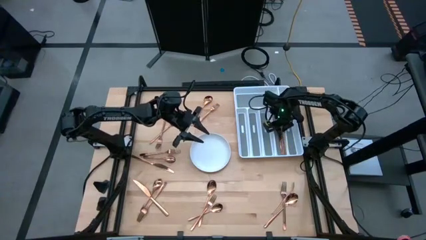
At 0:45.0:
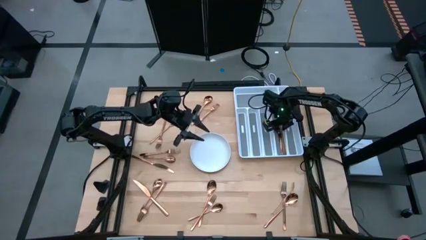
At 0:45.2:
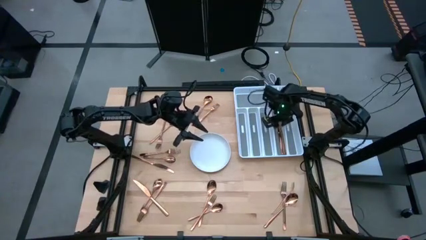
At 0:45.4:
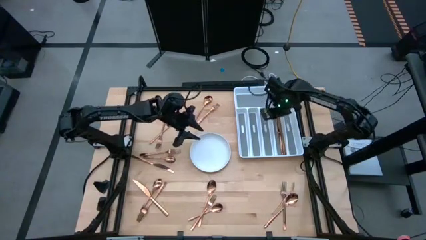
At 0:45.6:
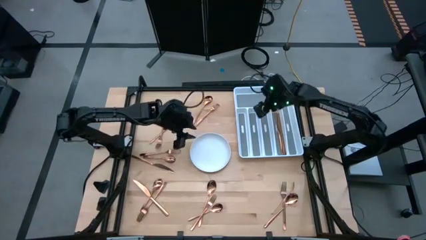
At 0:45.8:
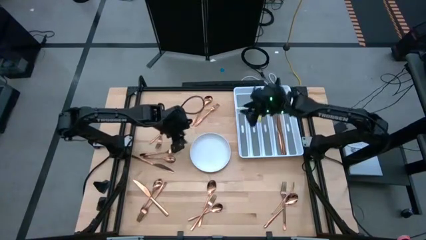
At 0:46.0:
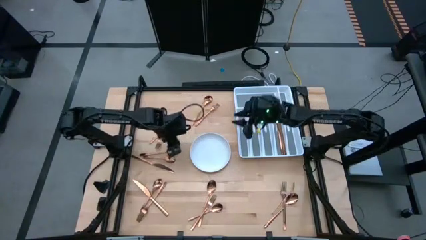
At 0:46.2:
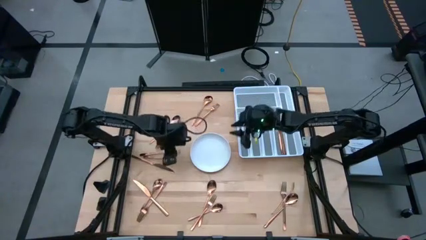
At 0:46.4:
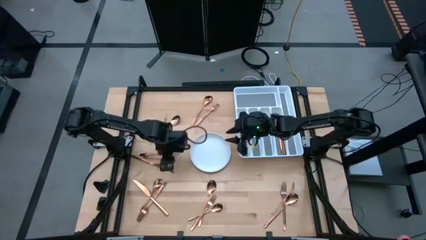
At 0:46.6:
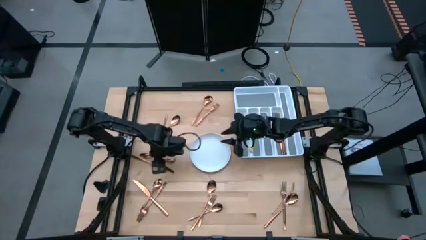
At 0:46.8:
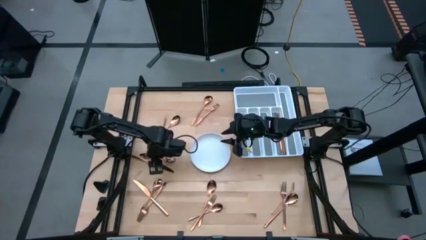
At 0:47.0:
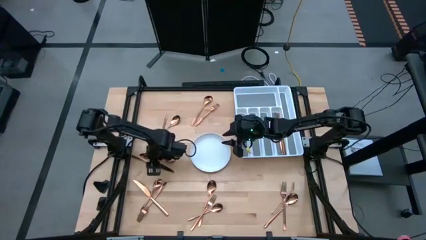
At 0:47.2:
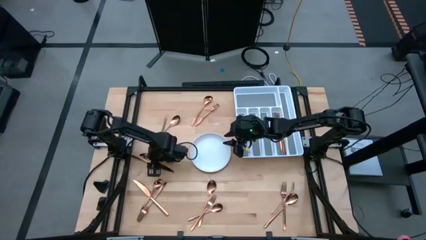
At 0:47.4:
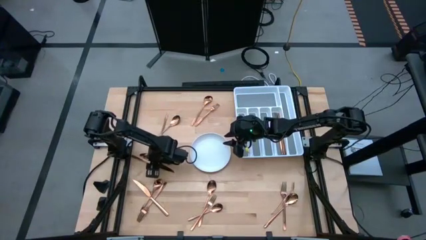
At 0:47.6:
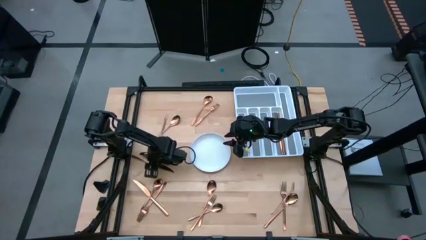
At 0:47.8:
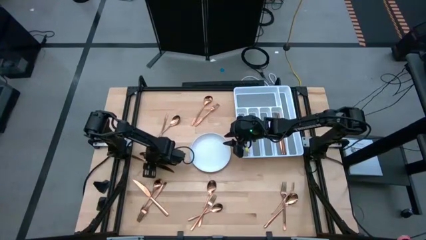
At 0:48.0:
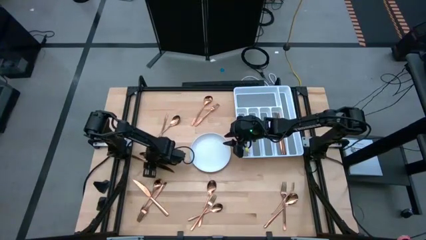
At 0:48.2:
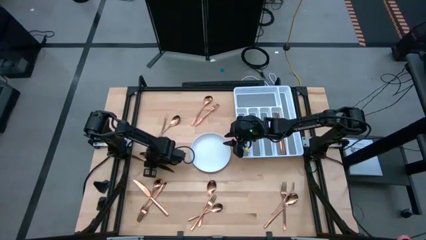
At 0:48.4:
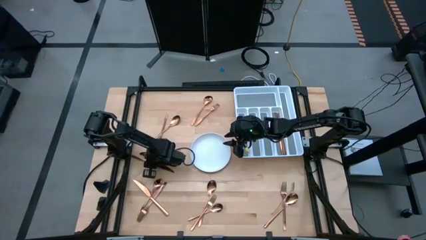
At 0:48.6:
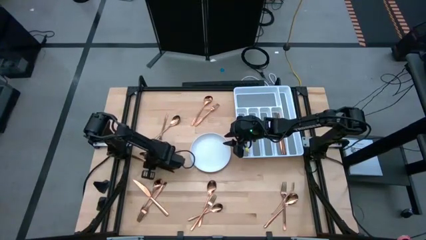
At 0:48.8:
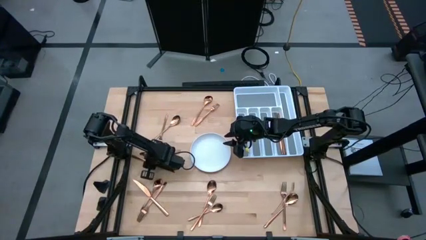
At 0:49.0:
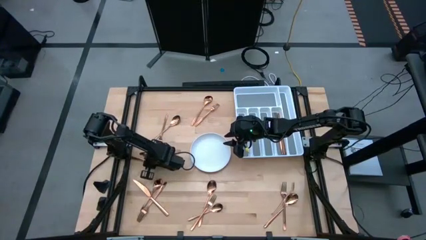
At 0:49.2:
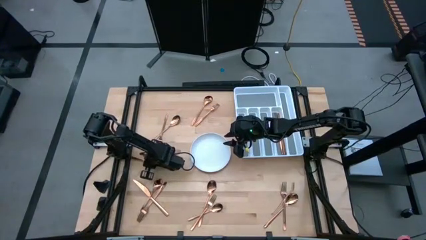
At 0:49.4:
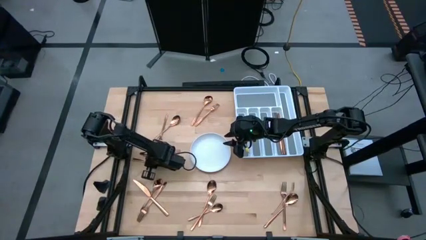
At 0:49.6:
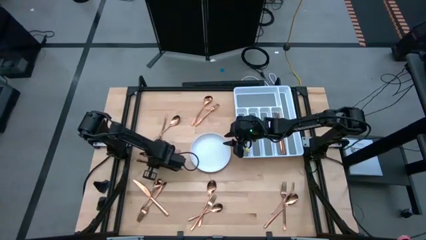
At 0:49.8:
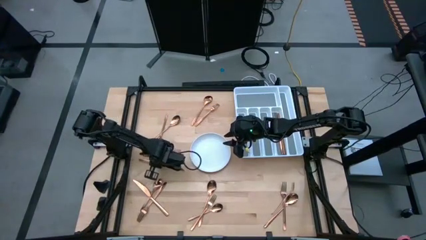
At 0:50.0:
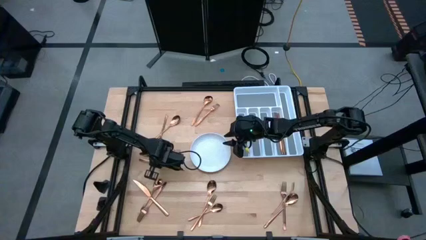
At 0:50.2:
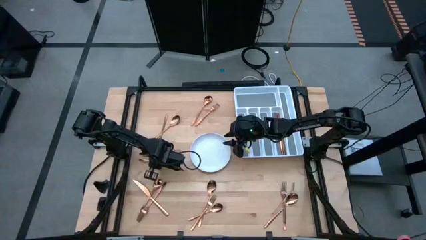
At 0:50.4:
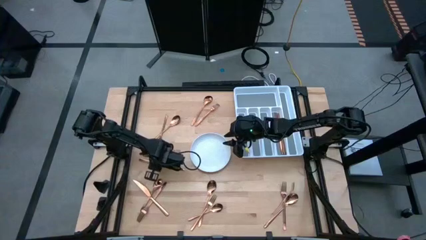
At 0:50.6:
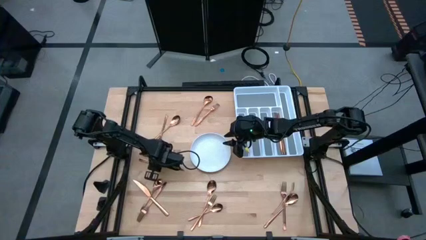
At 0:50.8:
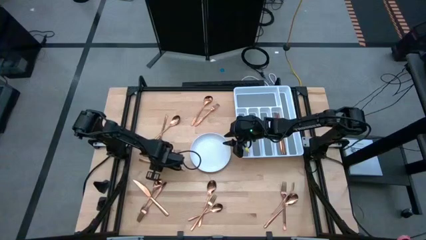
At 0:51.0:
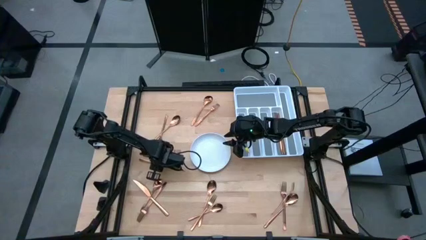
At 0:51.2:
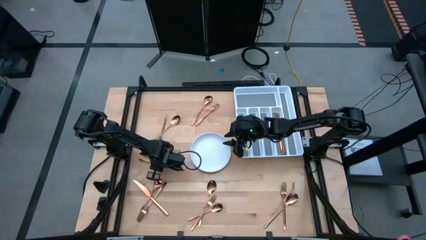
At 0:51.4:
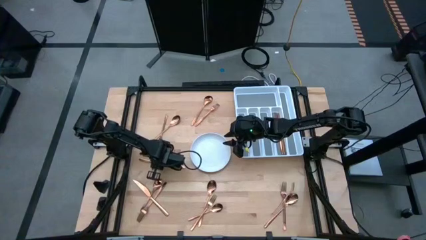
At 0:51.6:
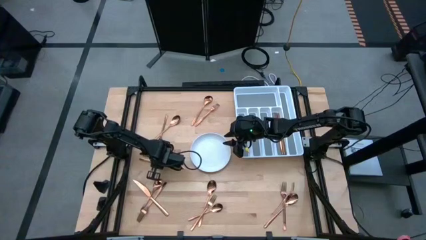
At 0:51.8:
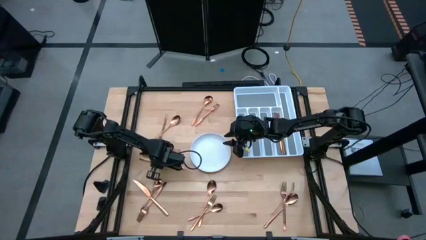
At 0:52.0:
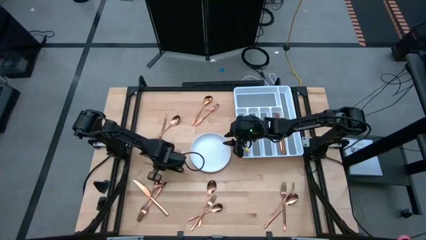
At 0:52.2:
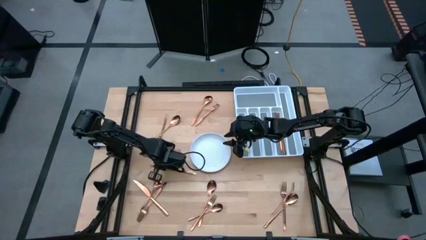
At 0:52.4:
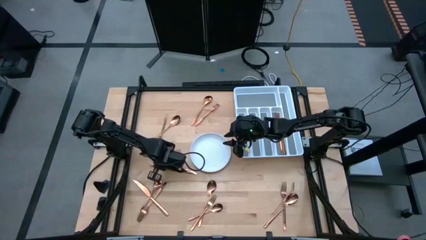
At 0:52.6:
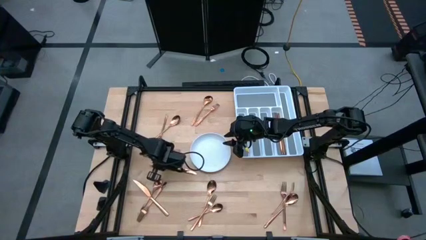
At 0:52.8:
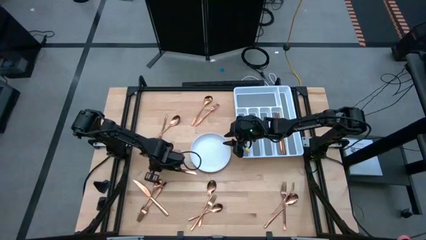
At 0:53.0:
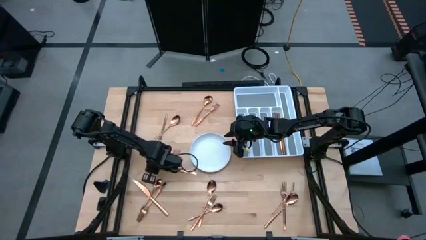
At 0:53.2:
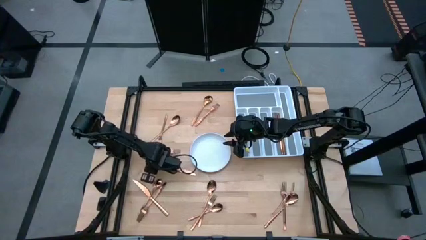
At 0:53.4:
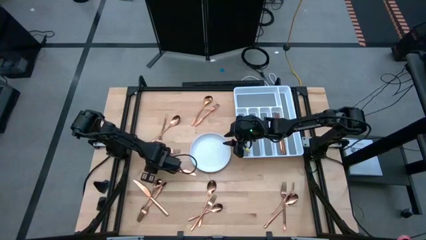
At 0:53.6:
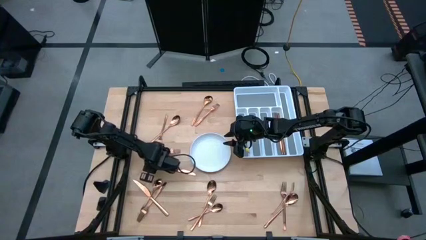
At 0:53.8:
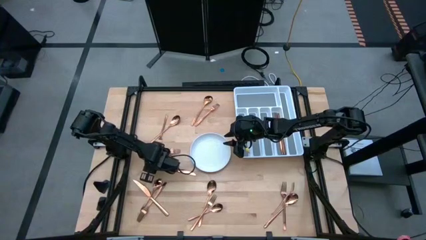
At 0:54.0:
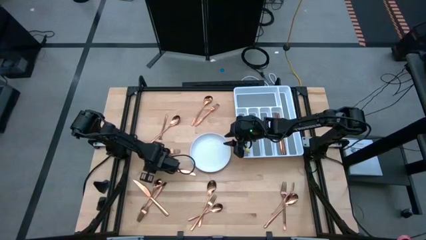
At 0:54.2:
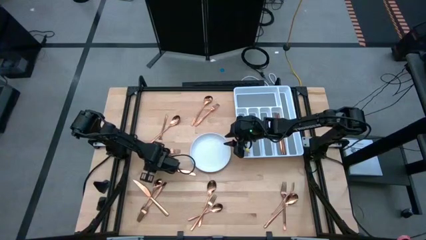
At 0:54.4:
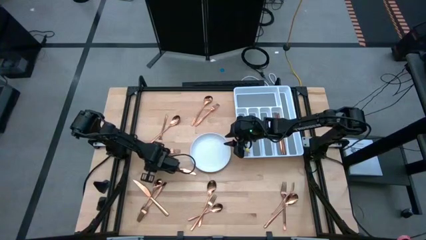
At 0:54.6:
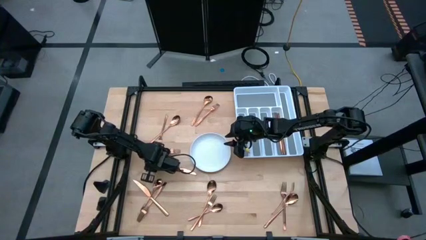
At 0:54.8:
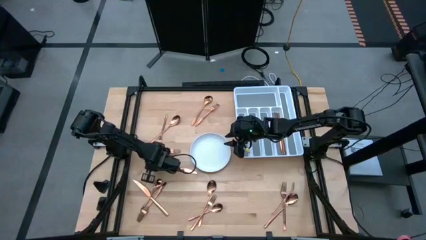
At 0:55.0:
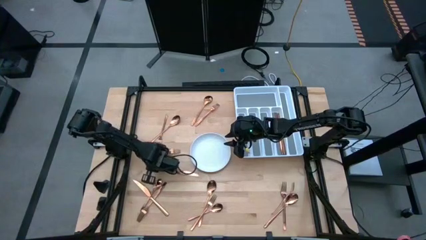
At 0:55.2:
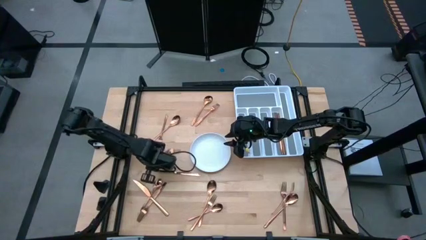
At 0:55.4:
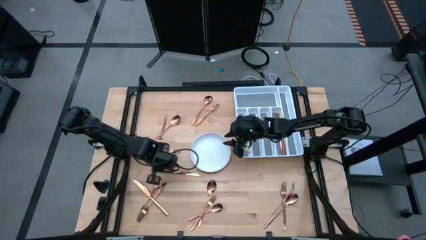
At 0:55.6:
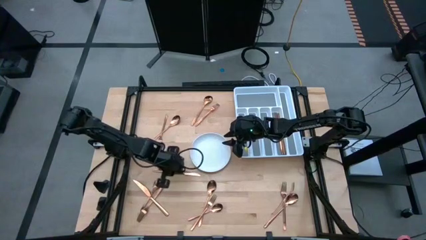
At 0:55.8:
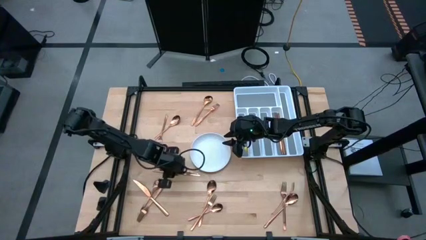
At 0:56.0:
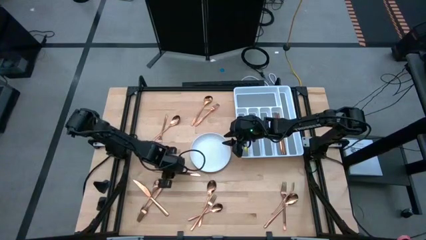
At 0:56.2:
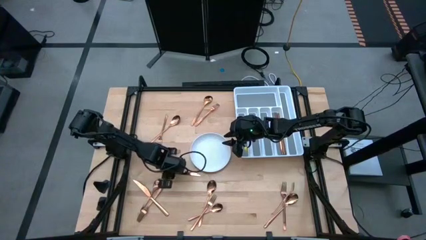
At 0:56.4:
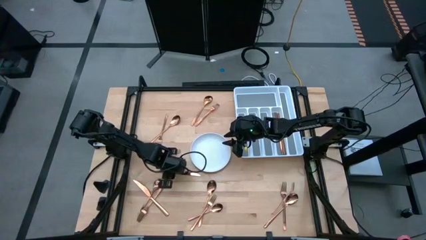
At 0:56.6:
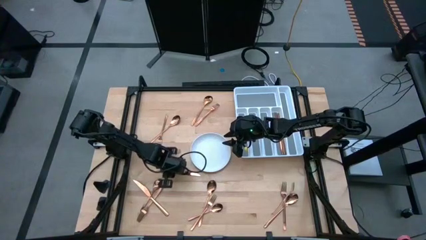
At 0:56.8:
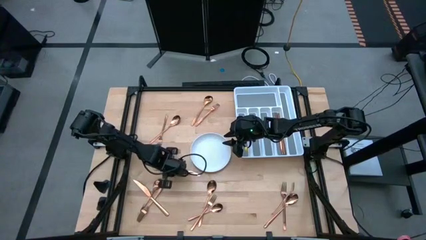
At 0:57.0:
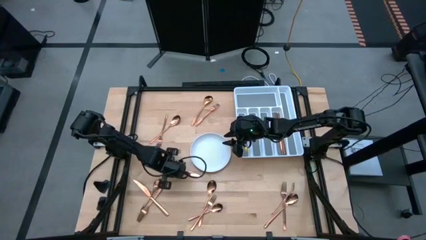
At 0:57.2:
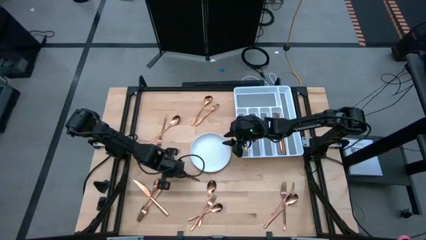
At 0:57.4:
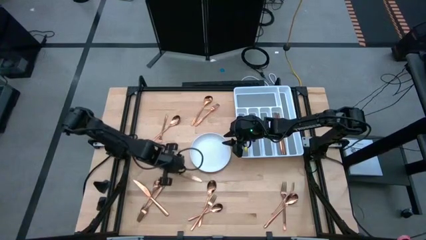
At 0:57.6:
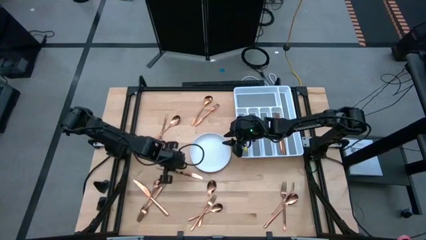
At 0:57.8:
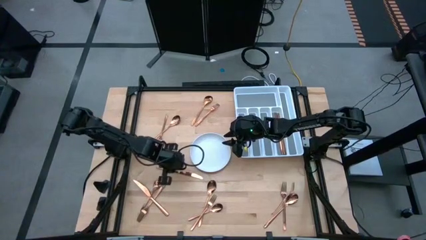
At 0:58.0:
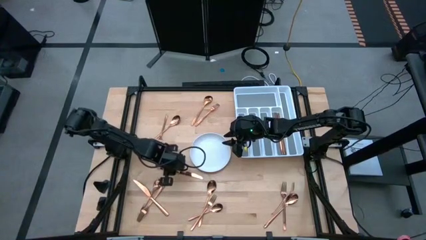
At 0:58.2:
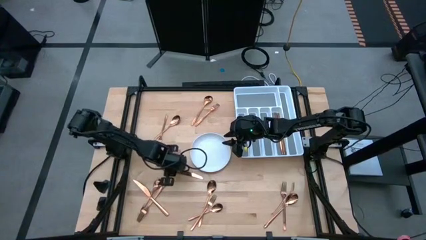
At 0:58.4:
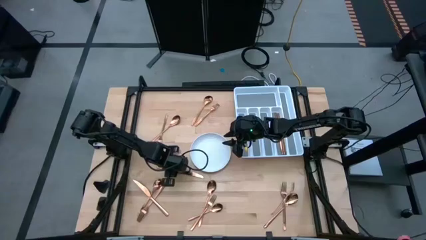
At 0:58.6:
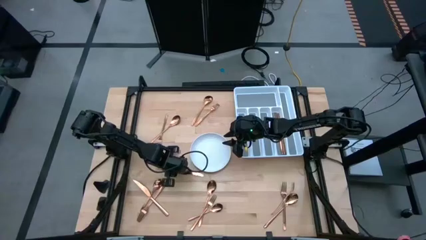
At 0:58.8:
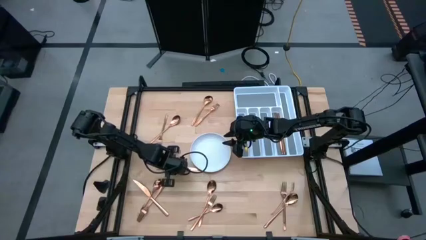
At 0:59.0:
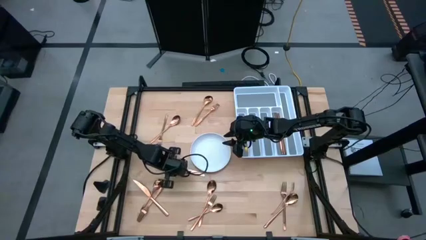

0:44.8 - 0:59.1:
Task: Sort silverware
Put the knife in the silverware tray

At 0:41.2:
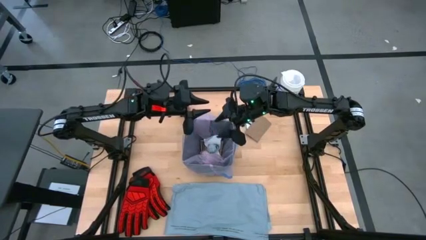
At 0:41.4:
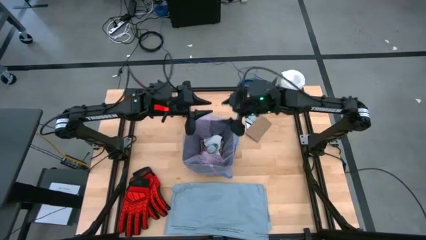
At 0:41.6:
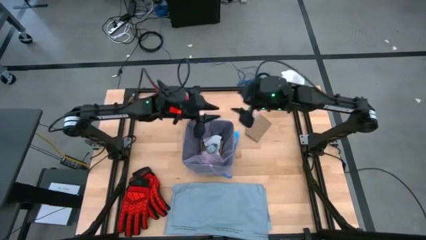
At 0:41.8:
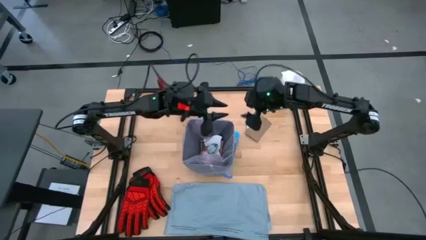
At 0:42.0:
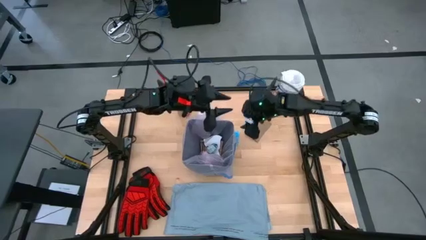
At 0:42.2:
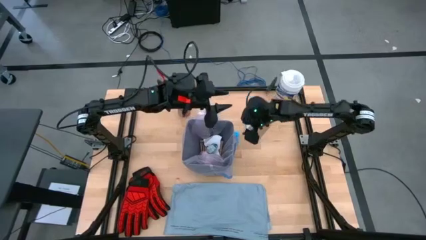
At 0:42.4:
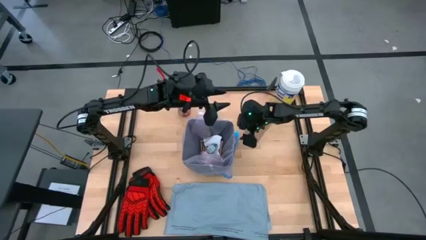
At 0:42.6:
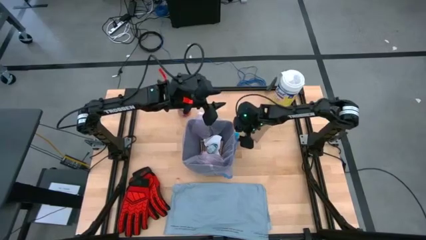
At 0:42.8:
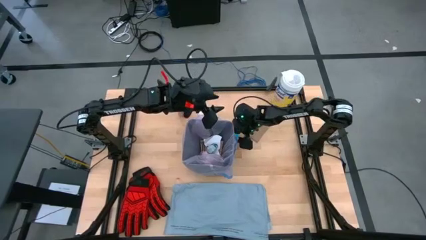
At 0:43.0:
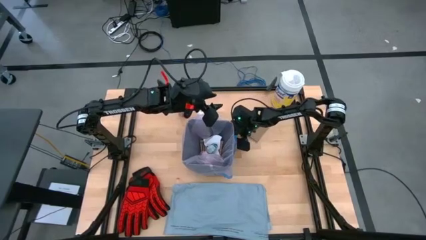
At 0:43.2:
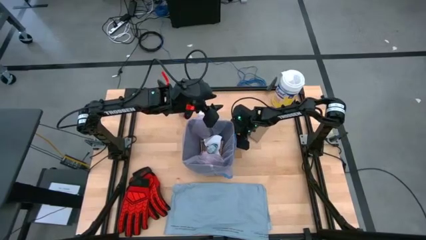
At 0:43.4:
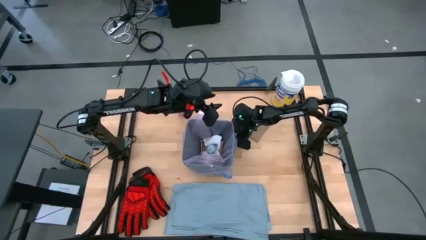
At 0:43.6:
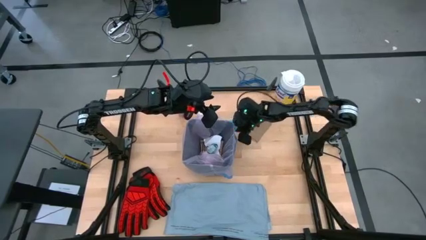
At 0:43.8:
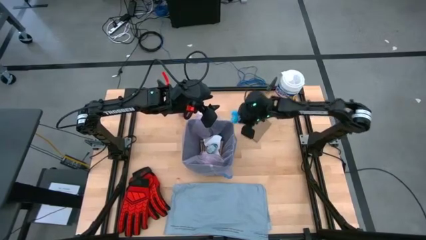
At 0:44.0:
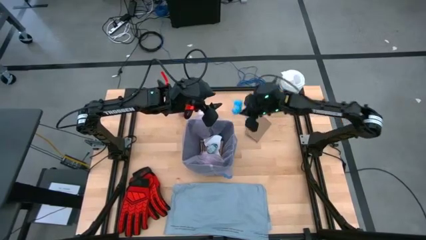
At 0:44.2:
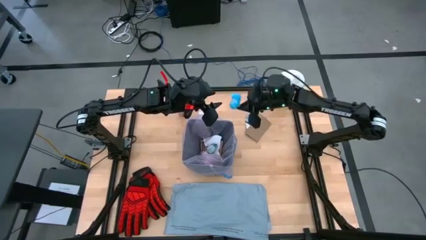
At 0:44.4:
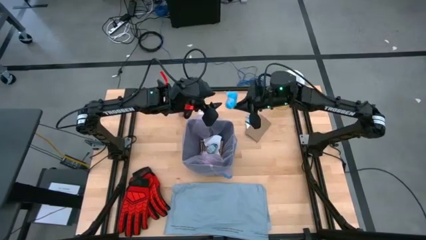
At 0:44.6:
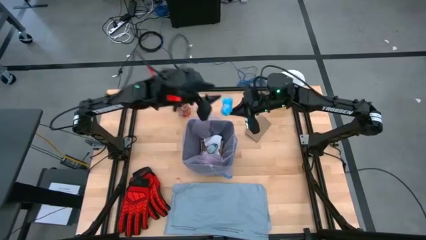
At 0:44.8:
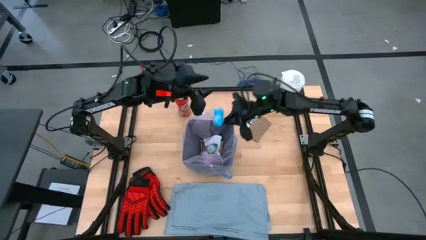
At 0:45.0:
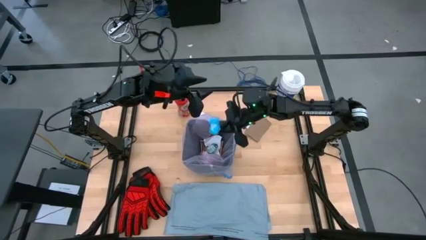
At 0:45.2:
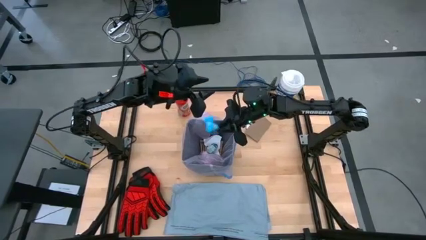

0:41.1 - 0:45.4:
Task: place trash/remove bag and relplace
Put the blue plastic material into the trash bin
